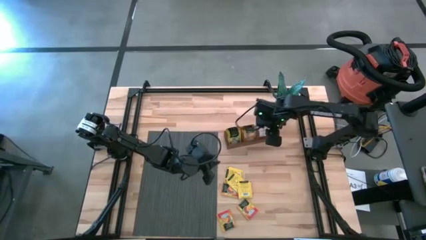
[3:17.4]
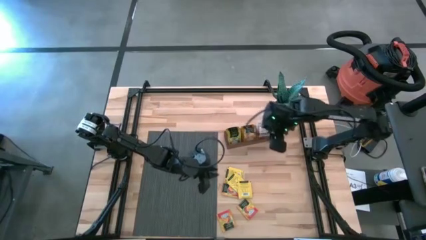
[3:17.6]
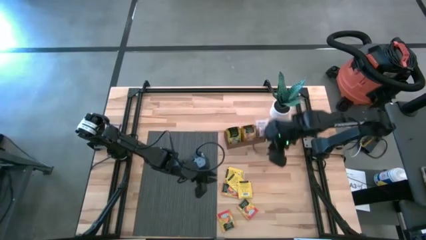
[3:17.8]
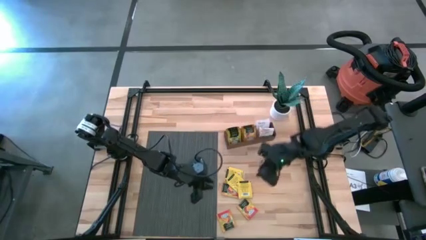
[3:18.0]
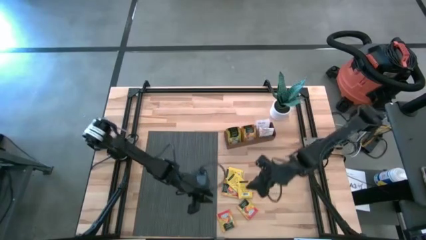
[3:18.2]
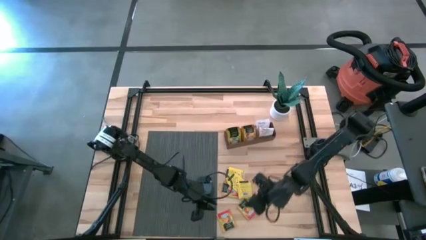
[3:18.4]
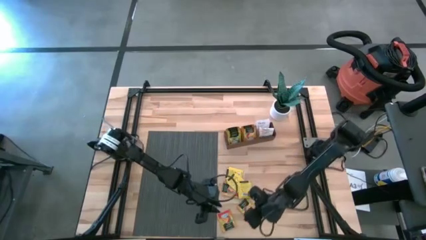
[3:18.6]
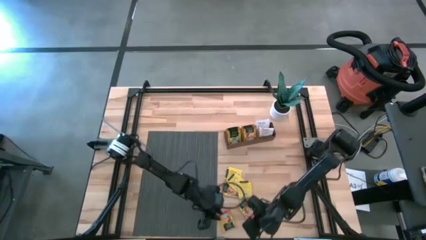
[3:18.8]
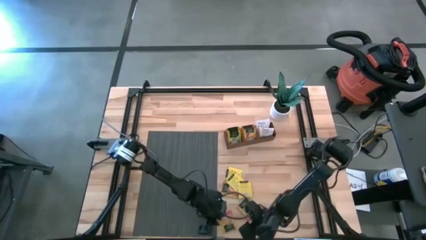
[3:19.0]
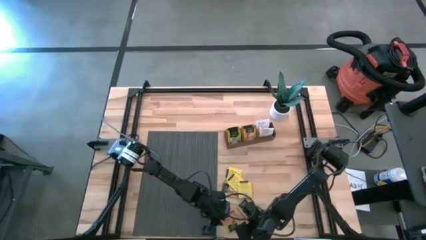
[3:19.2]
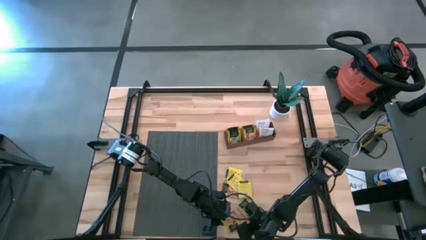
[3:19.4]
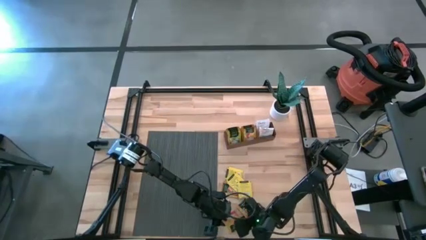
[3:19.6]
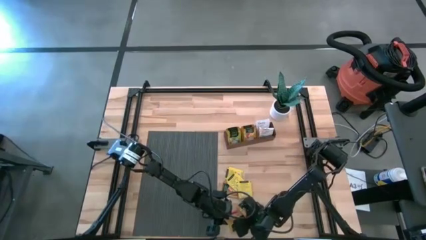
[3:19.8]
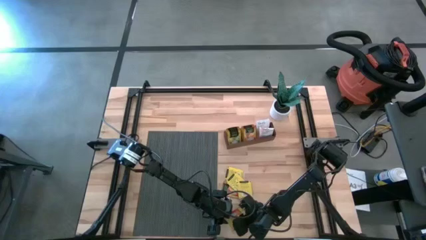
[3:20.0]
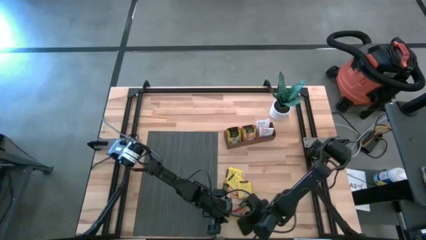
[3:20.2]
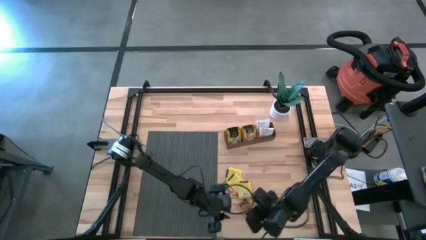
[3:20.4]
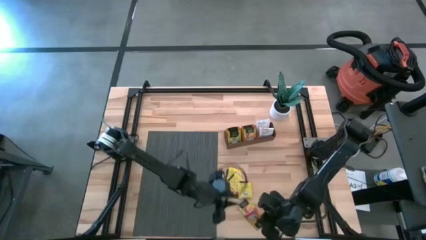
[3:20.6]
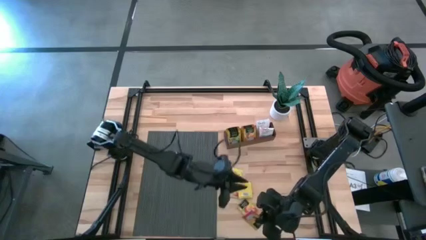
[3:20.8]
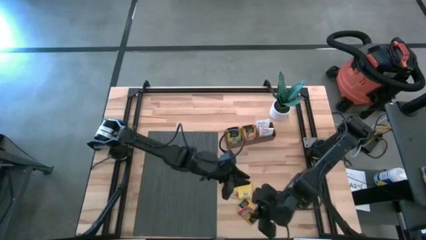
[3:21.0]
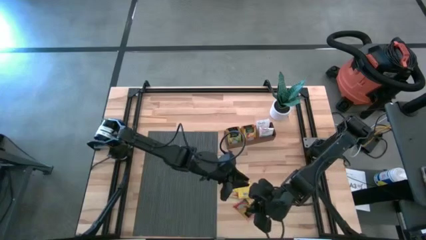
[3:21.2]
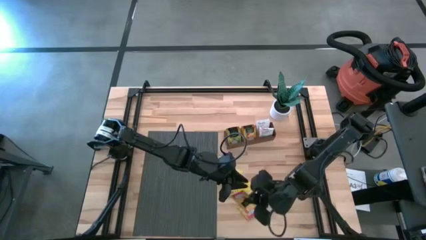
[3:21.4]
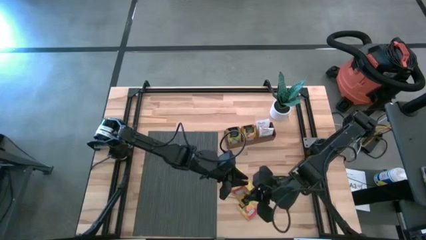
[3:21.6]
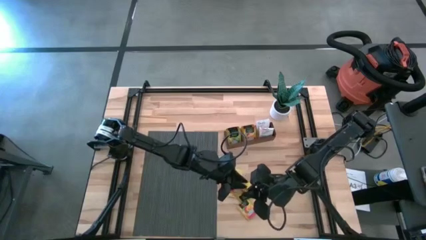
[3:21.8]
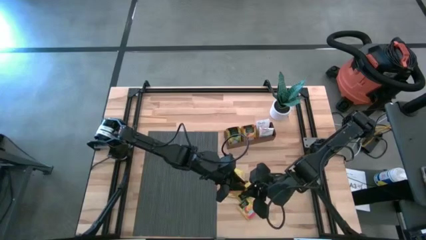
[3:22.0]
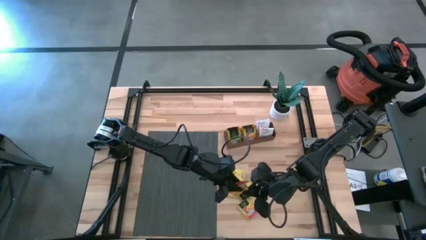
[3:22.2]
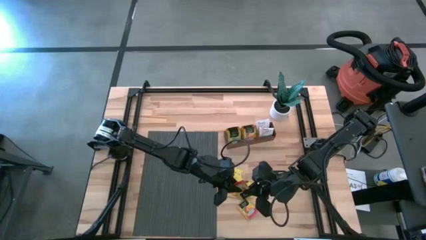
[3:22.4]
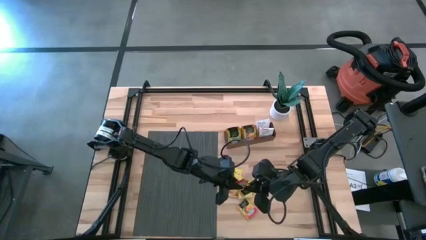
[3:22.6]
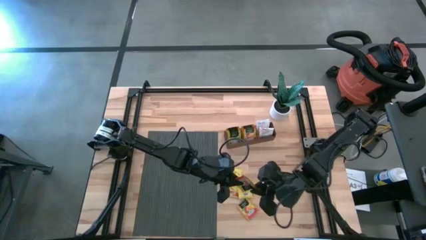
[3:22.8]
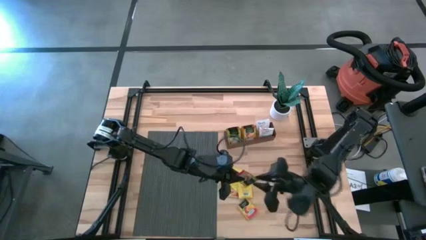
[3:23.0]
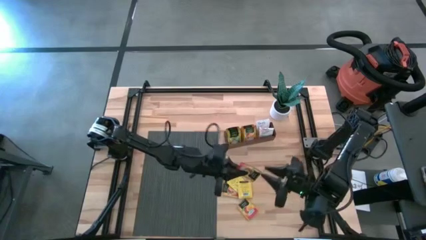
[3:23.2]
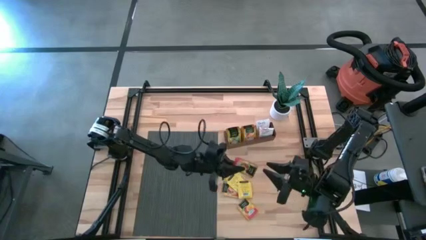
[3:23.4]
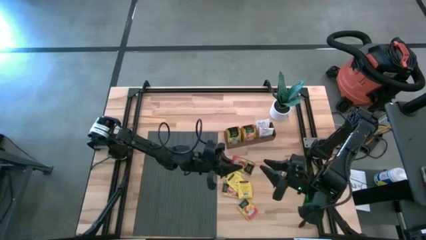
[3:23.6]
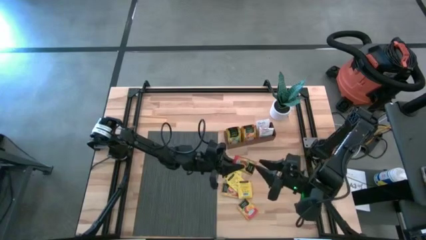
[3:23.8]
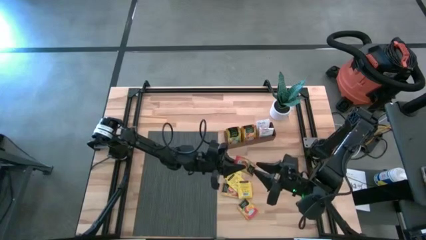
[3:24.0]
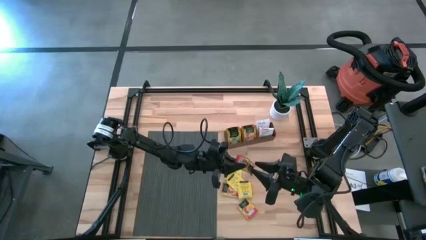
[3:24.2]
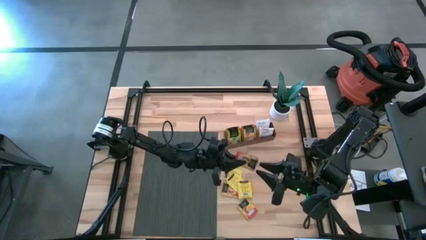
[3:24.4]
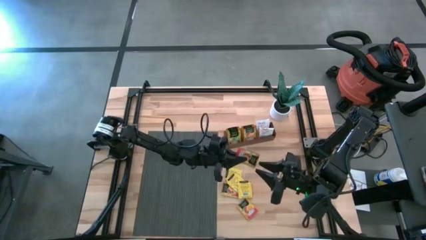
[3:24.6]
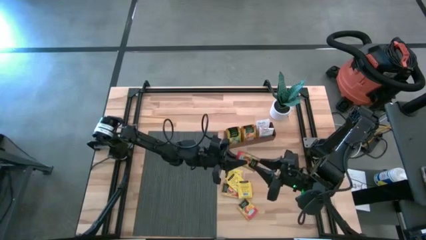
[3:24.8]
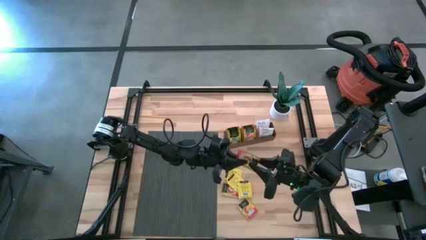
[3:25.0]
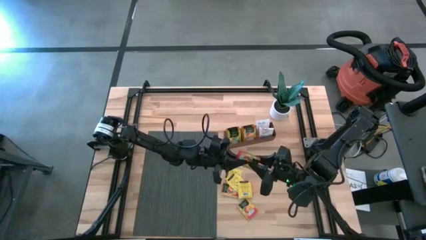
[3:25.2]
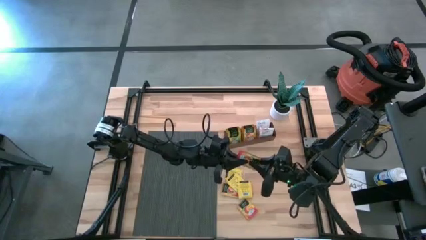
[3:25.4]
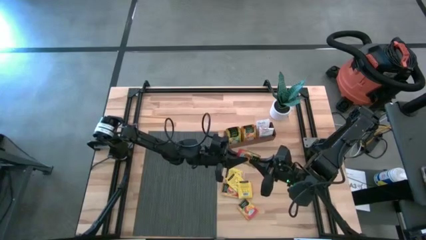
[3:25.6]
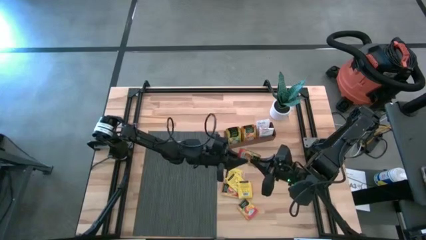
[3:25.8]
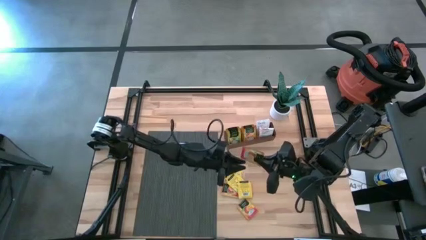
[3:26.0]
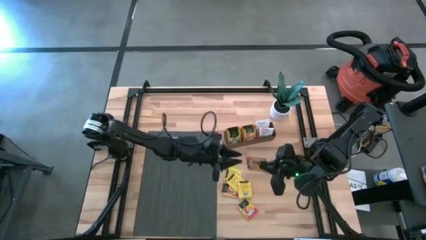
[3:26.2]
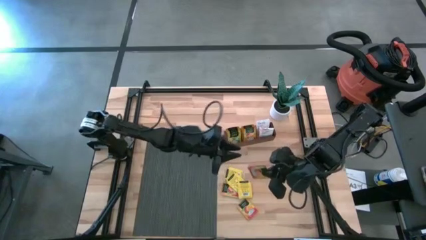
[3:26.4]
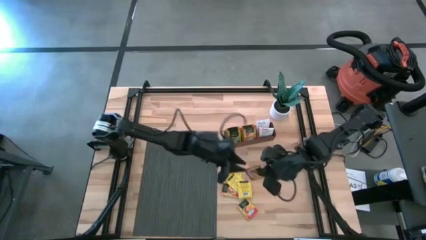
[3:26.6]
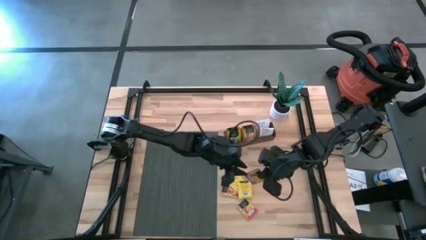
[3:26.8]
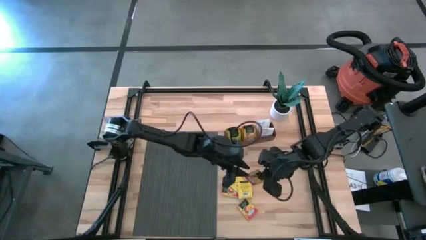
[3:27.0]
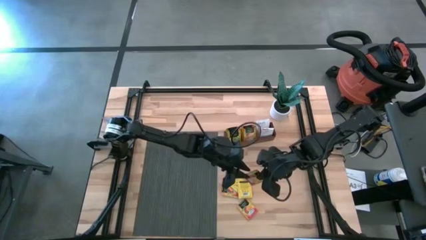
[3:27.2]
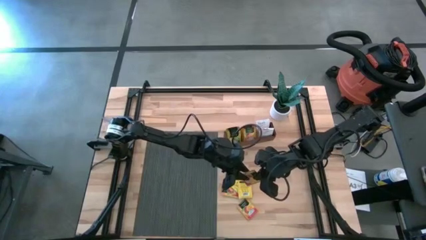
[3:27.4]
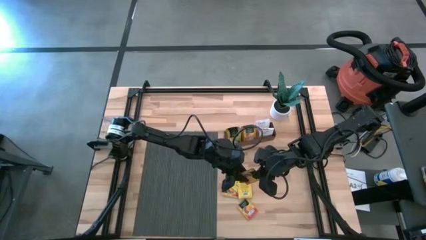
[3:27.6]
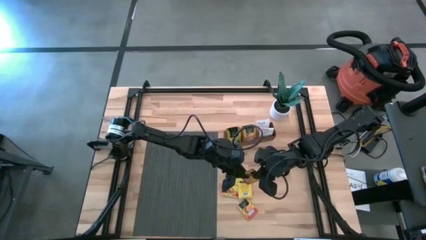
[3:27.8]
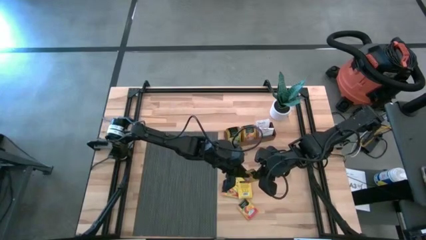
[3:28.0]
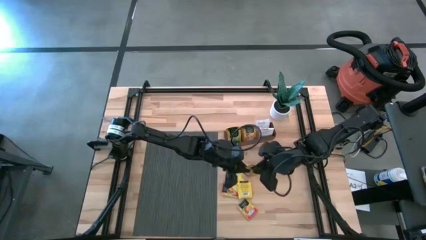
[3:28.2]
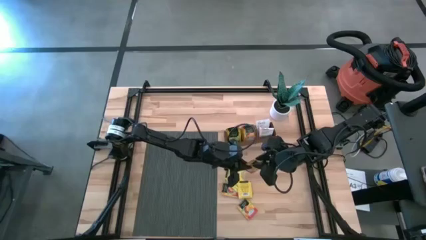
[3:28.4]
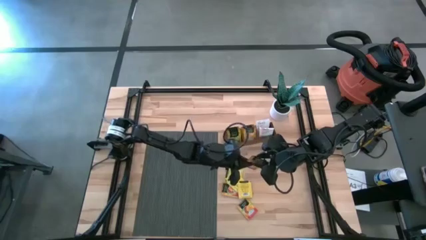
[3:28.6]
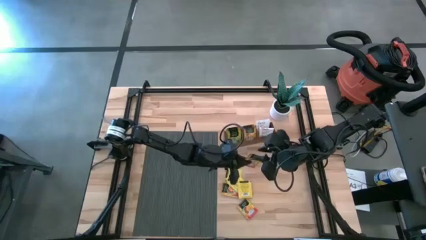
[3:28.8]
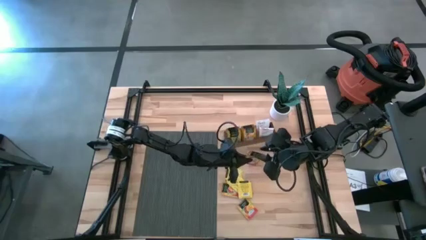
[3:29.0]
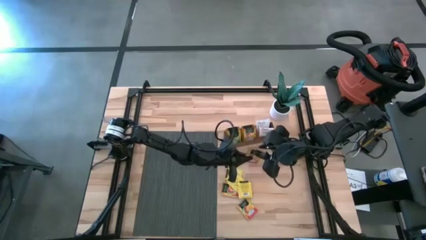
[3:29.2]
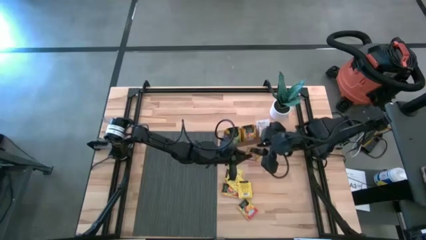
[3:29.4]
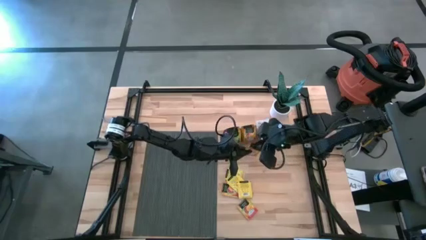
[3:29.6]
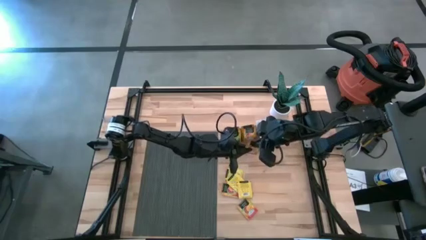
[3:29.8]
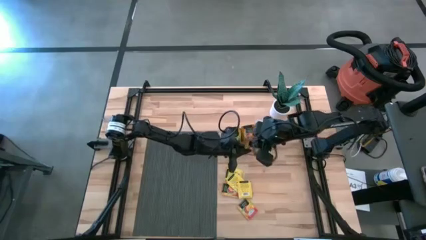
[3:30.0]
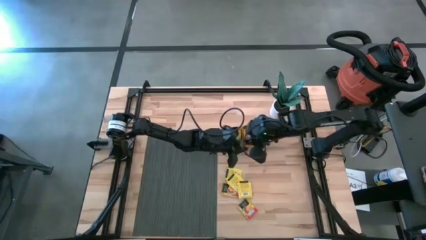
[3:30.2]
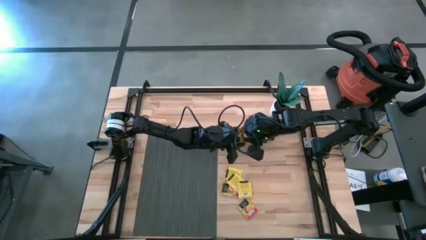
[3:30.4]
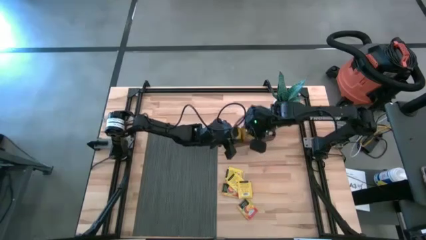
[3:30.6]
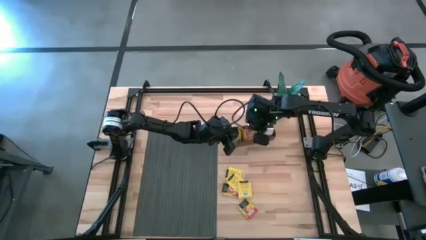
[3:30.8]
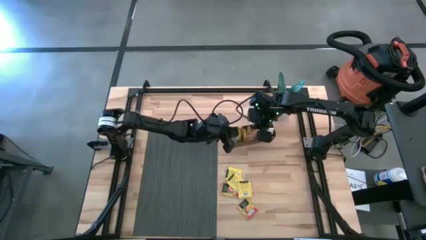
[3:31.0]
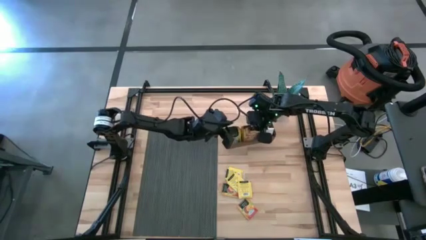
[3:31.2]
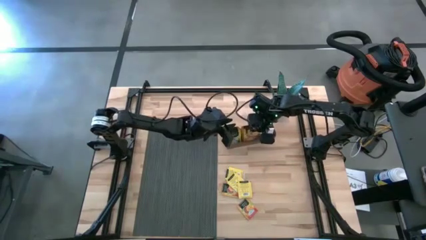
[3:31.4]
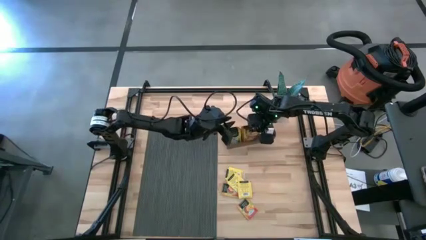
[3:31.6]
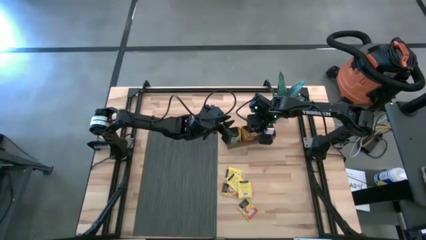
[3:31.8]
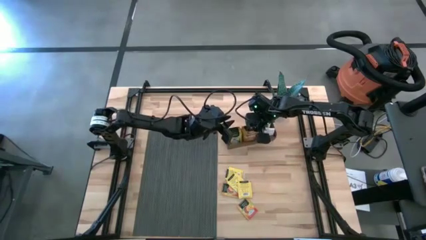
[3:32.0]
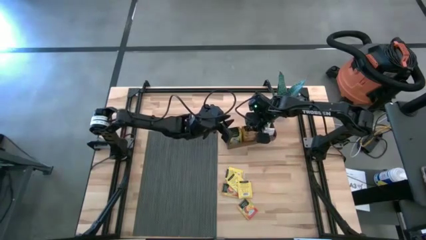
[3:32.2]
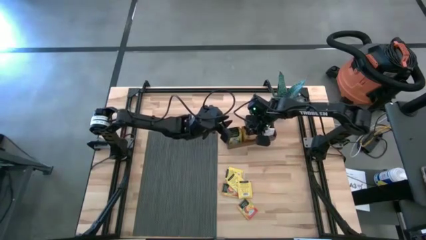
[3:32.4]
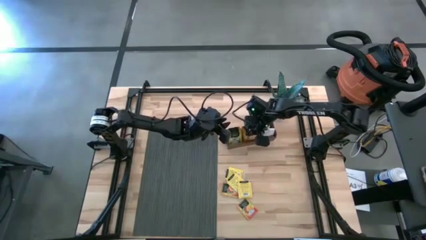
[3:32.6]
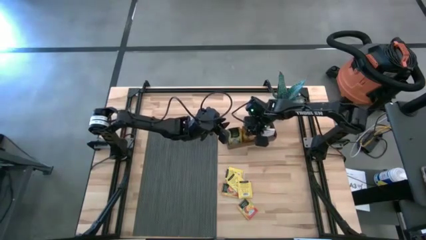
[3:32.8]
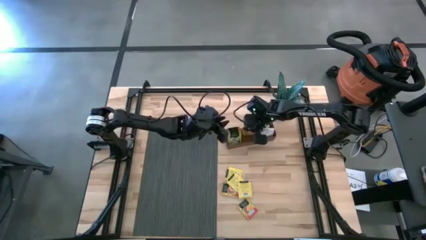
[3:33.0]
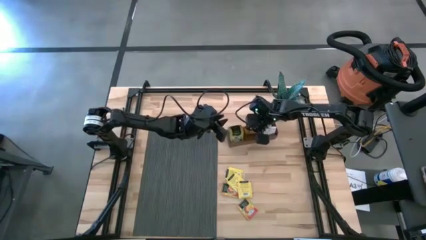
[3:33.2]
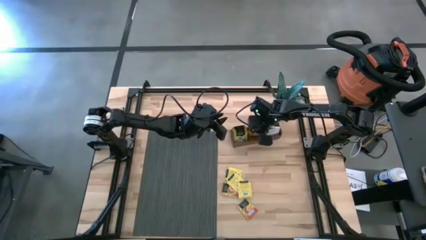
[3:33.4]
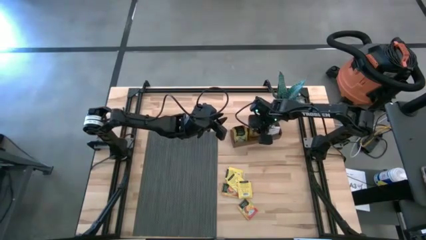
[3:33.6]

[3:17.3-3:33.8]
Task: Pick & Place Tea
Put the orange tea bag into the left section of the wooden organizer
